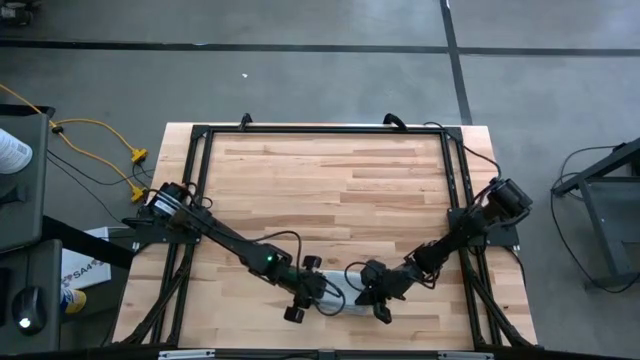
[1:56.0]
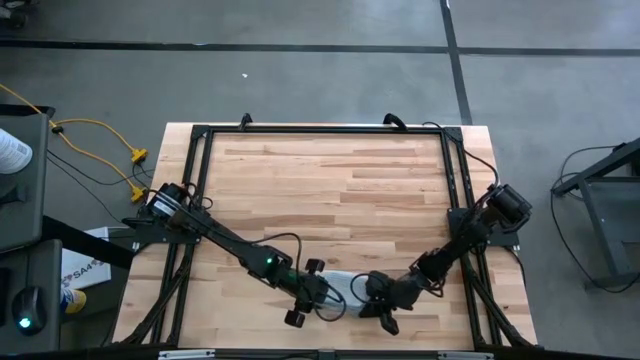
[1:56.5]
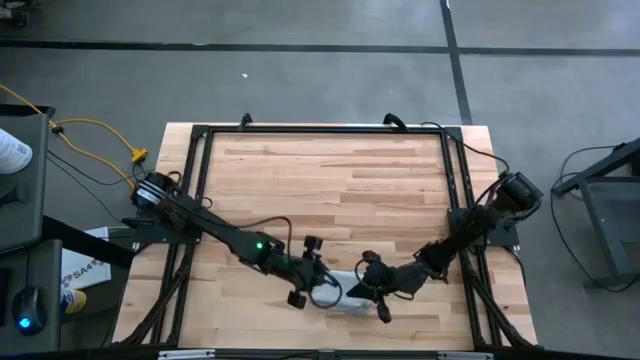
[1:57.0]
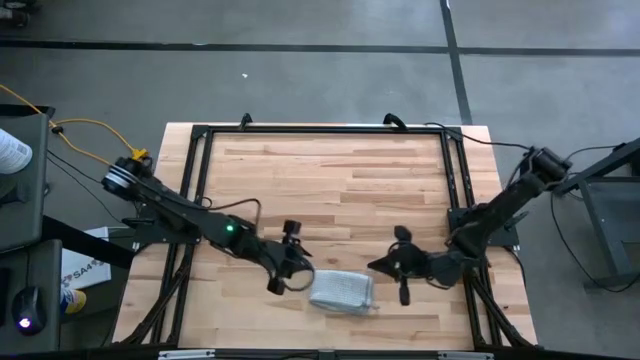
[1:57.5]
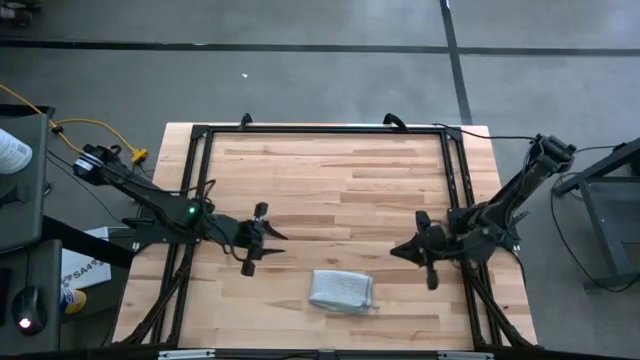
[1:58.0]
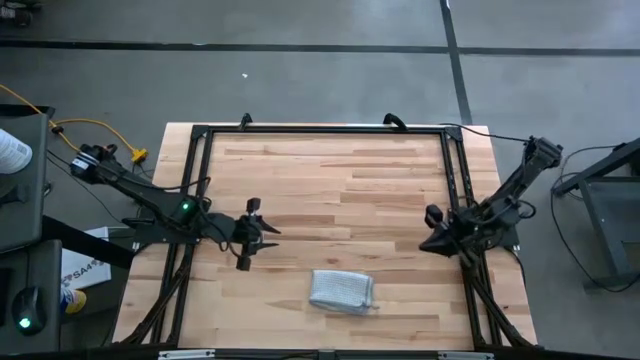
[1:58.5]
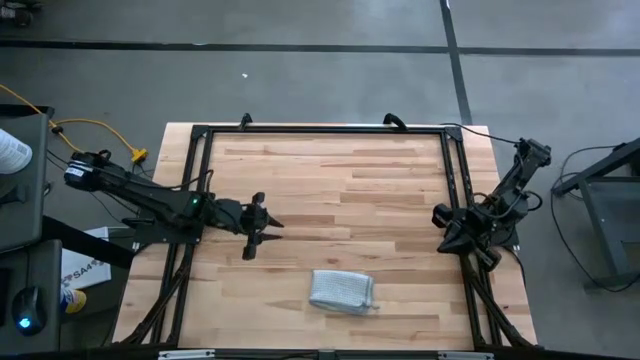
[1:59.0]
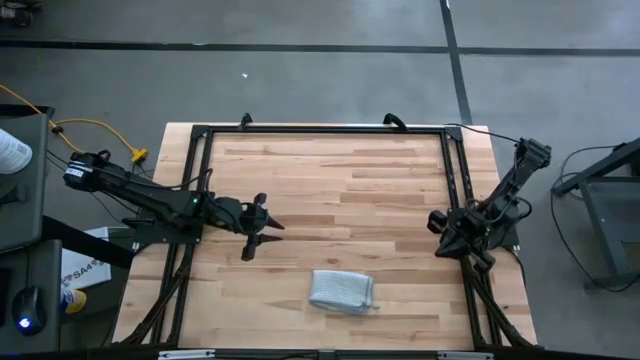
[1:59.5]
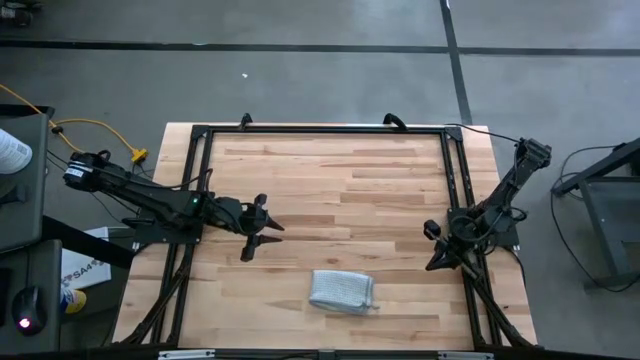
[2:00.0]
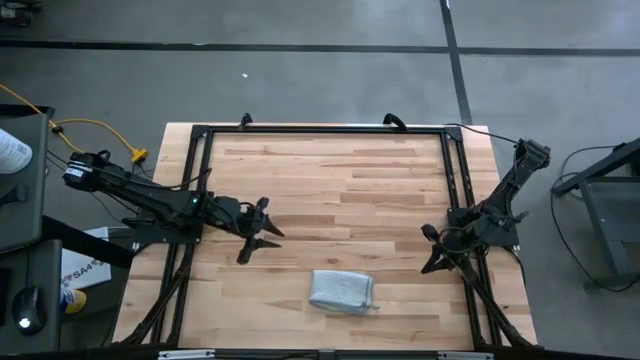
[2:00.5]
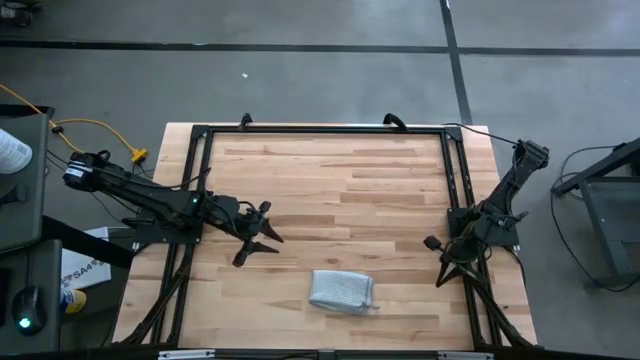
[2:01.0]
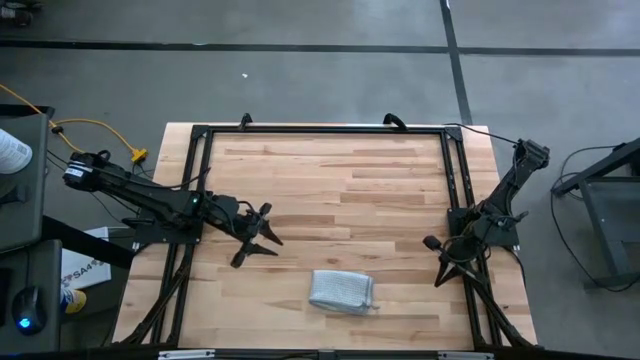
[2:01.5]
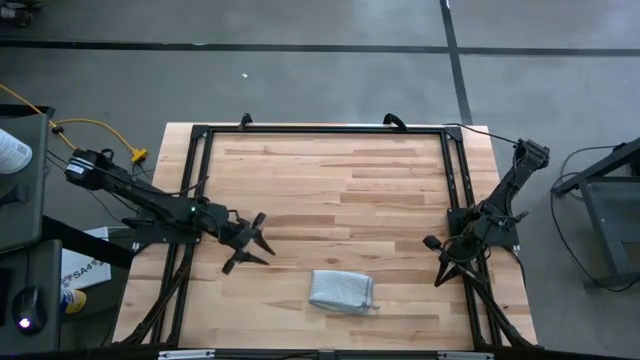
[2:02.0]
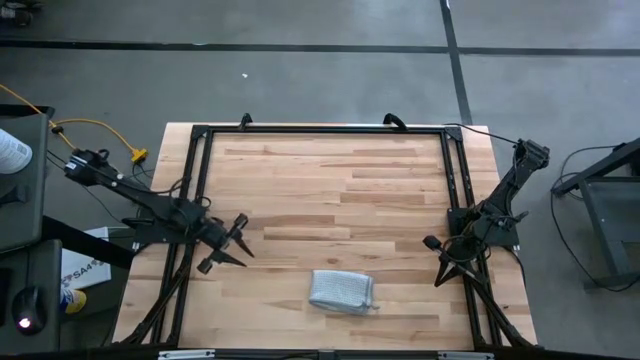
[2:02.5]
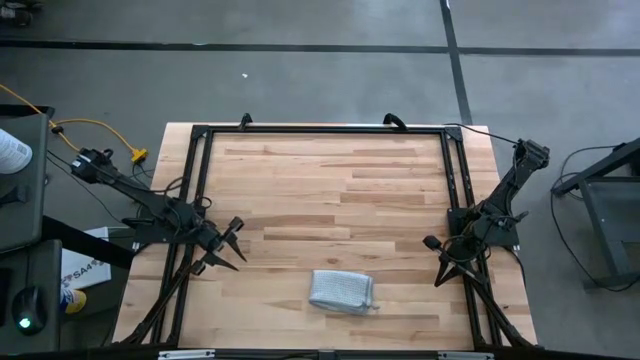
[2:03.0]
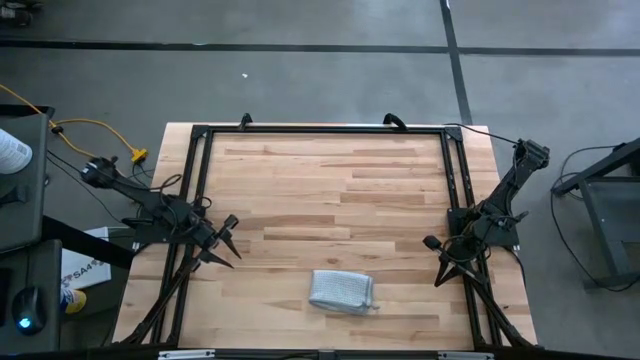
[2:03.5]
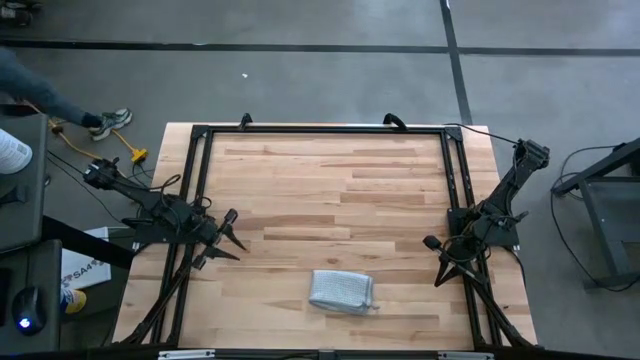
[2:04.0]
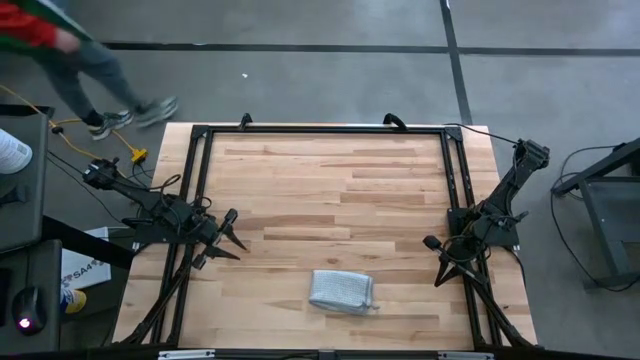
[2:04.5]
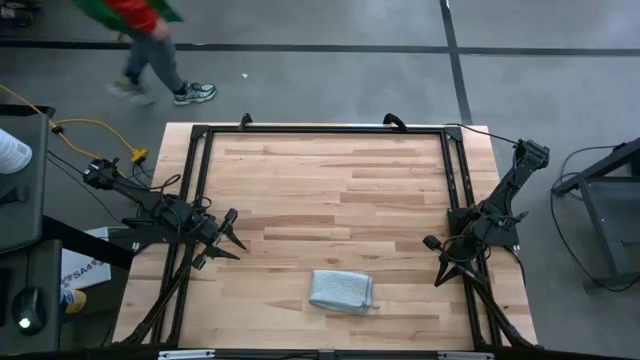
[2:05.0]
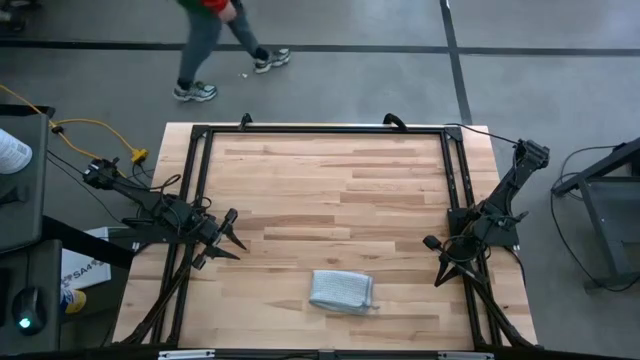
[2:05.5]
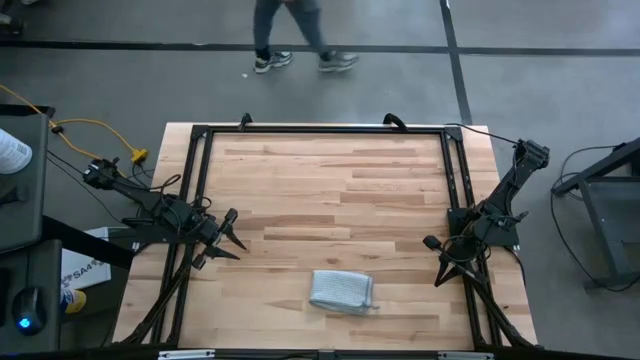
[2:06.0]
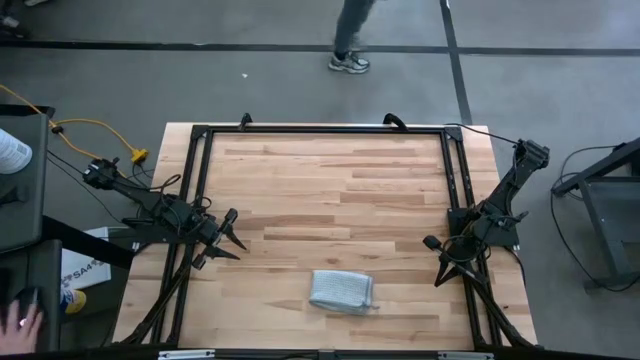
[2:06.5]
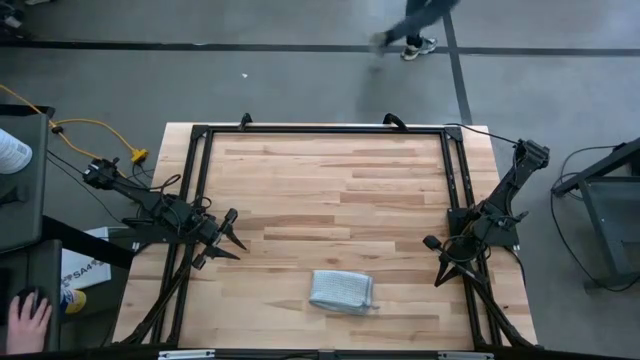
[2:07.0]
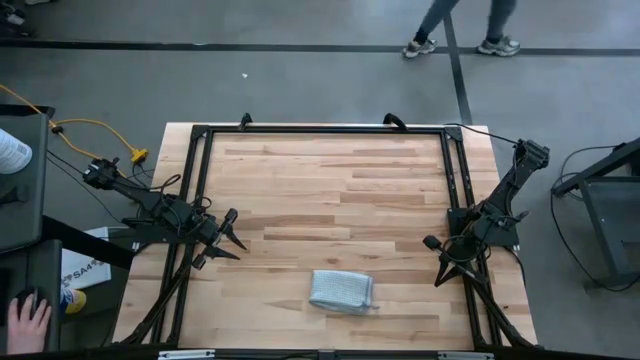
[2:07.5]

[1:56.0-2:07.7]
Task: Fold microfiber towels
Return to Home Position

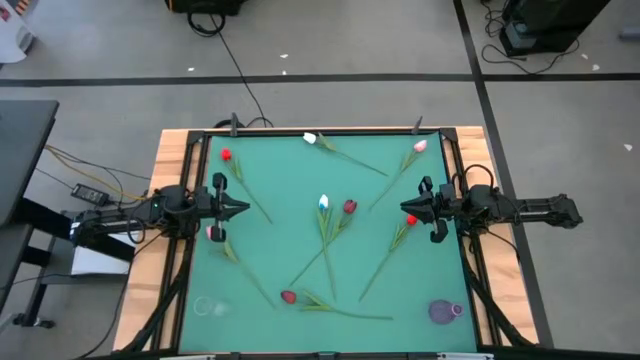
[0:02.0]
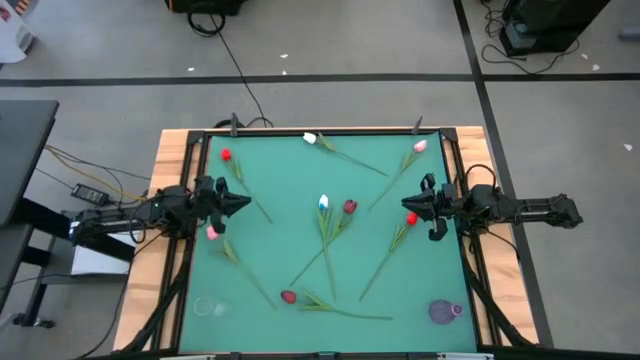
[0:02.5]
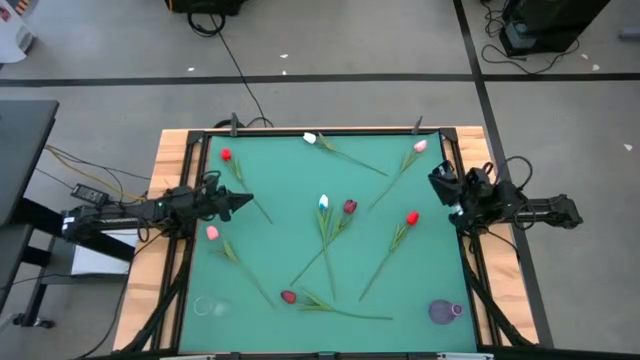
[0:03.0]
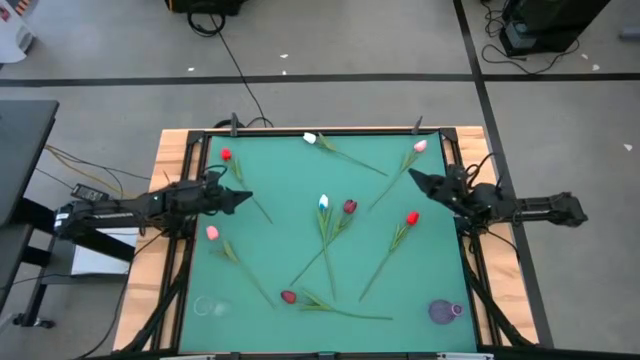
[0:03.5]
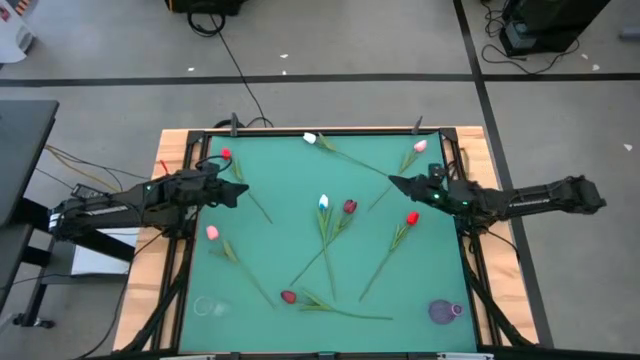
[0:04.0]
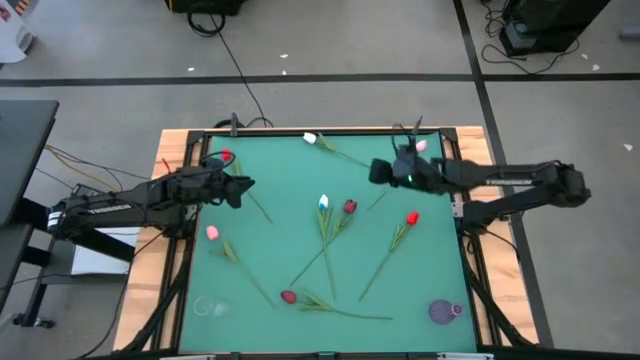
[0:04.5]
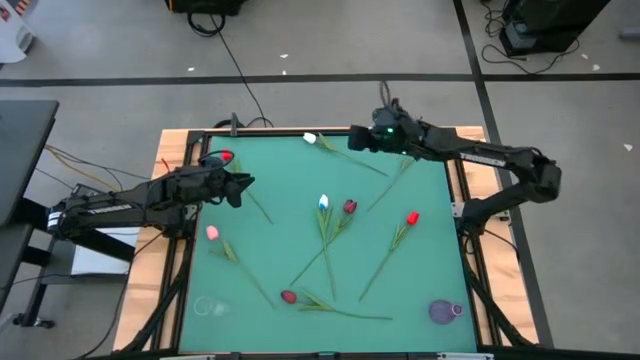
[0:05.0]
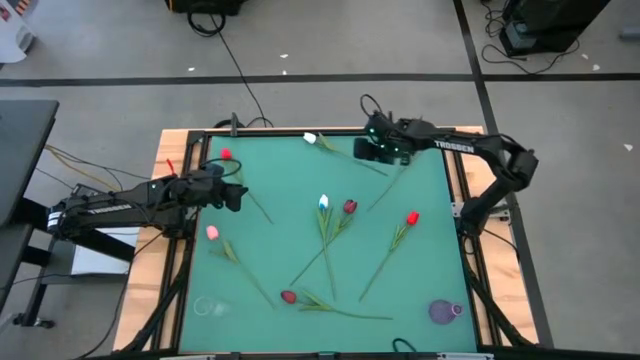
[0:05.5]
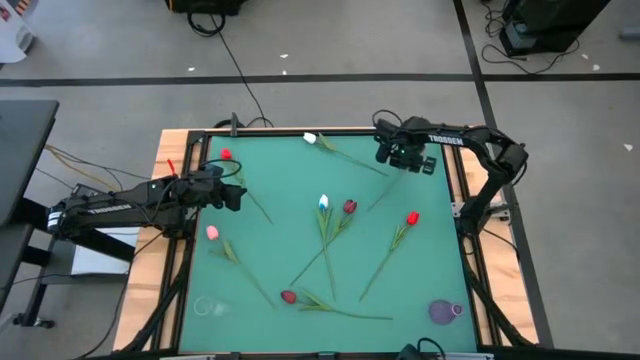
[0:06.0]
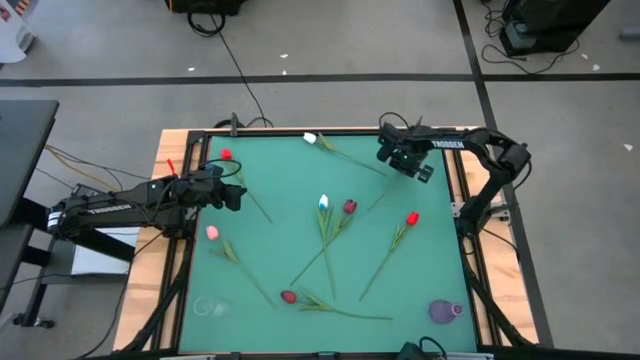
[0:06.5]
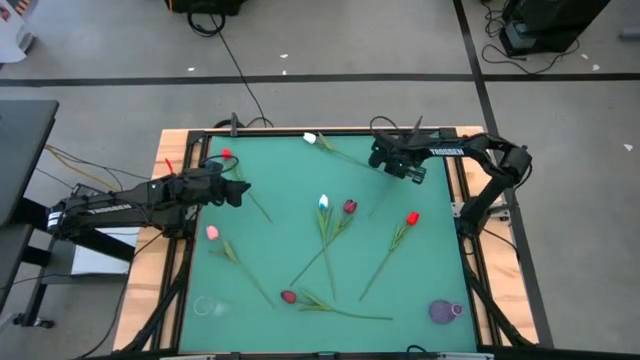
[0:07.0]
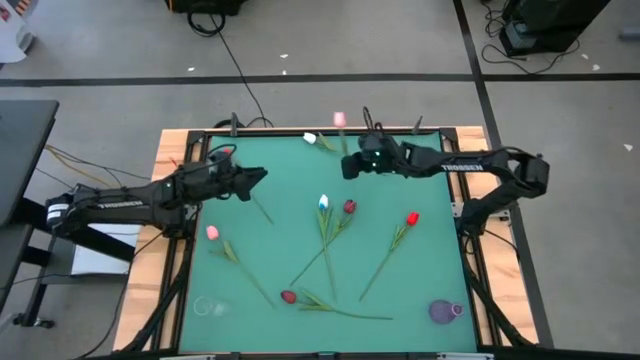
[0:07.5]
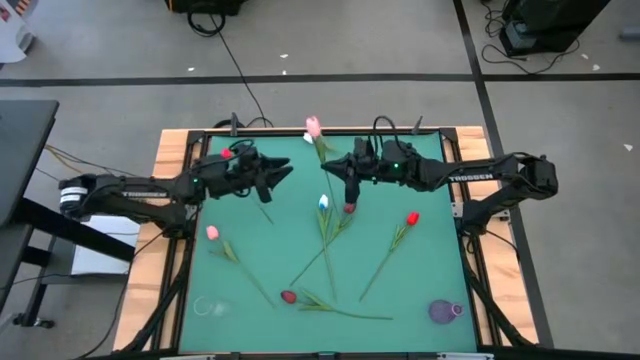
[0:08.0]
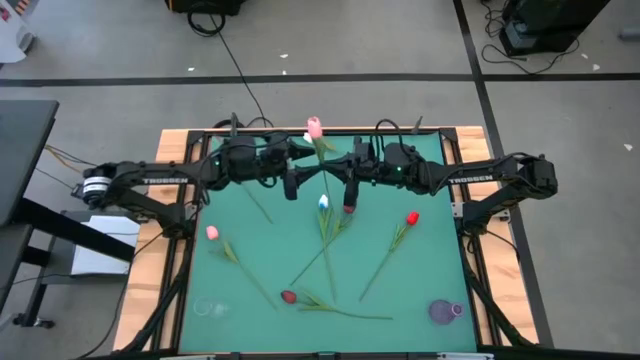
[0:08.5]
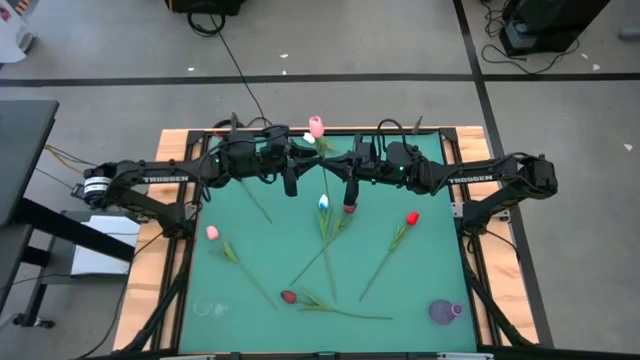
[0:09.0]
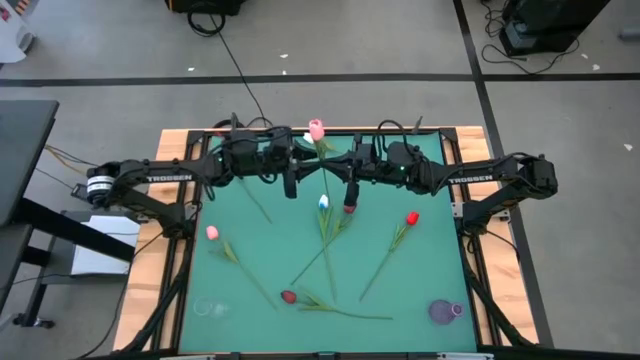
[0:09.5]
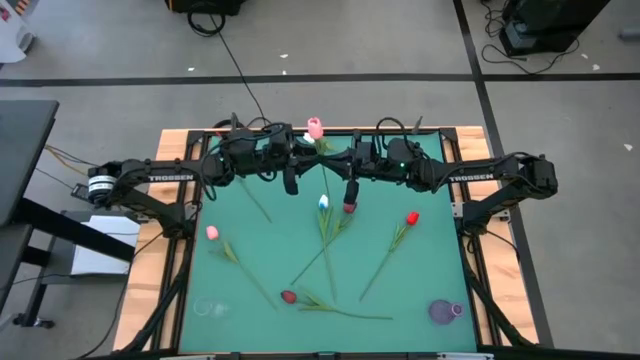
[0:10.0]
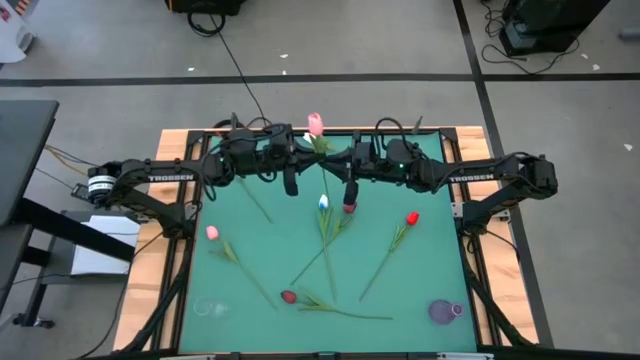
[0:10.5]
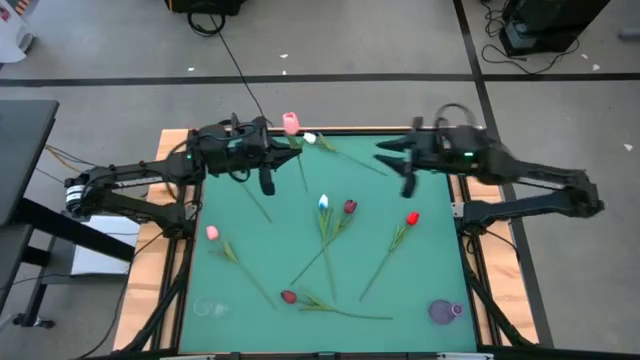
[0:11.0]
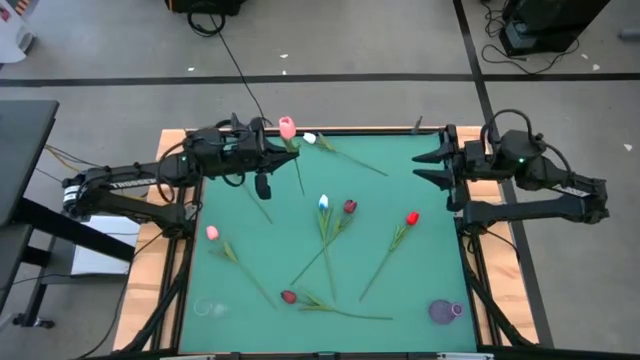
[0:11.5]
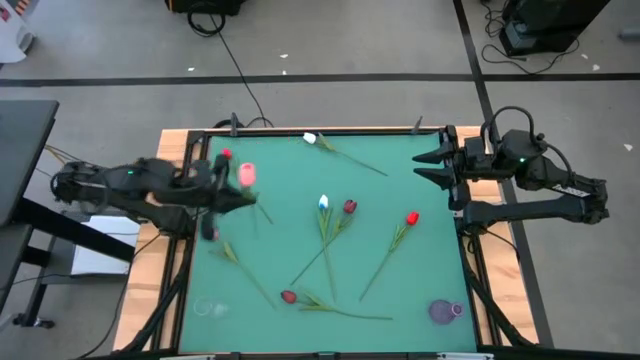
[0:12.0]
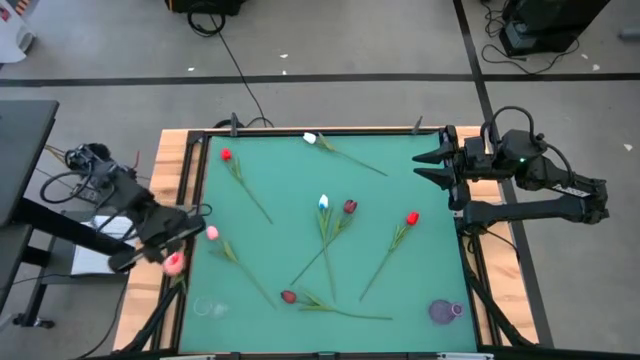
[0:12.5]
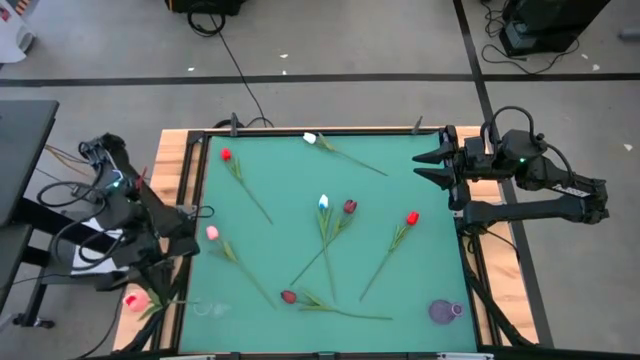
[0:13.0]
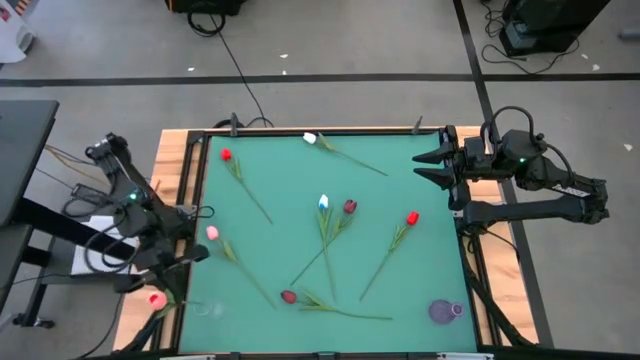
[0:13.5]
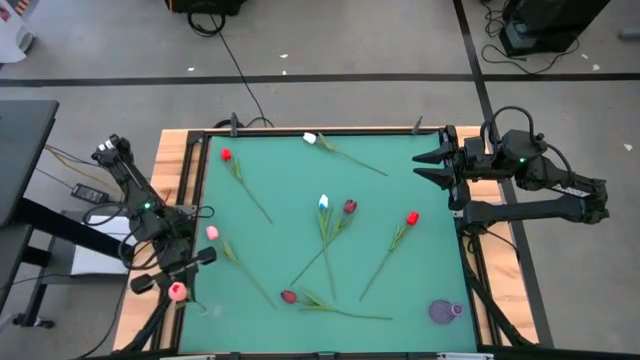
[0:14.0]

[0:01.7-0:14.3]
Task: Sort flowers into vase by color
Put the top pink flower into the transparent vase
